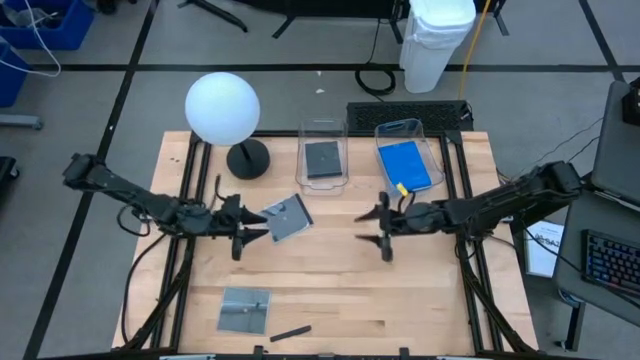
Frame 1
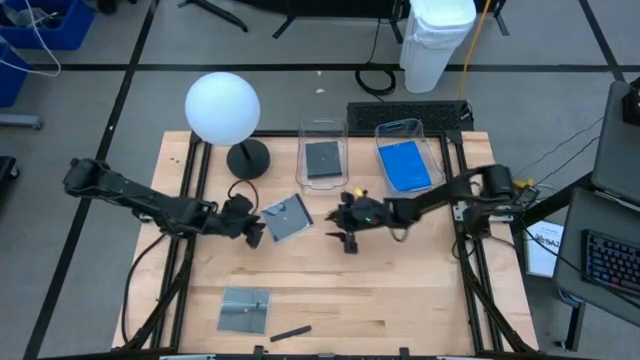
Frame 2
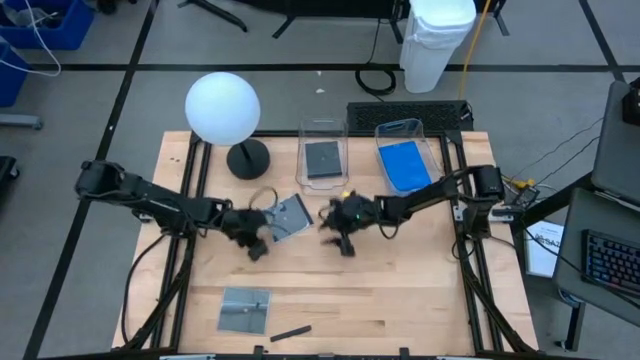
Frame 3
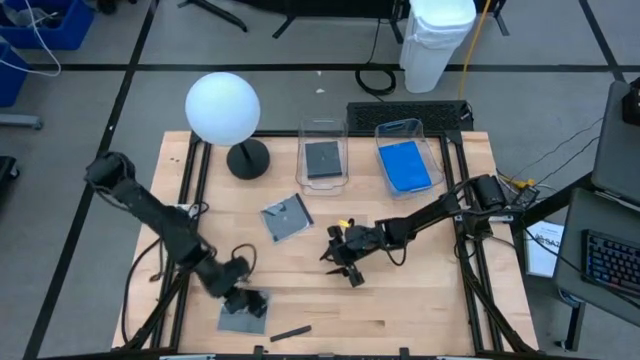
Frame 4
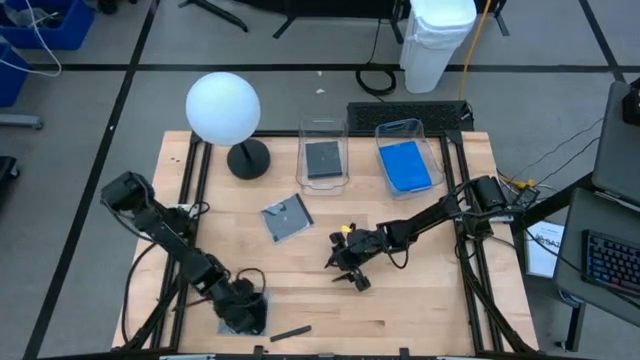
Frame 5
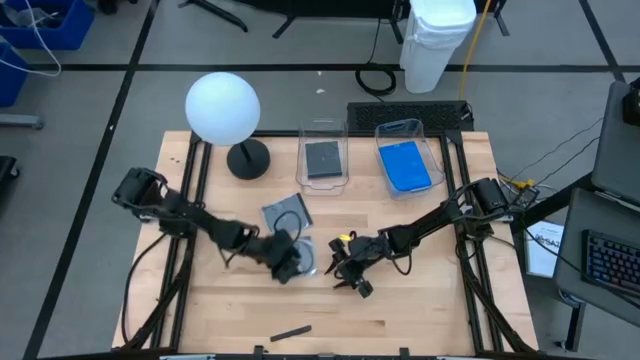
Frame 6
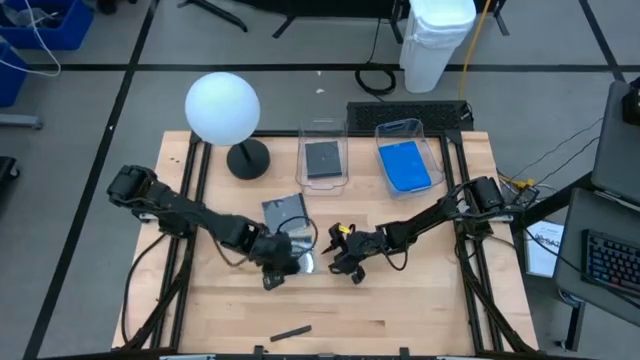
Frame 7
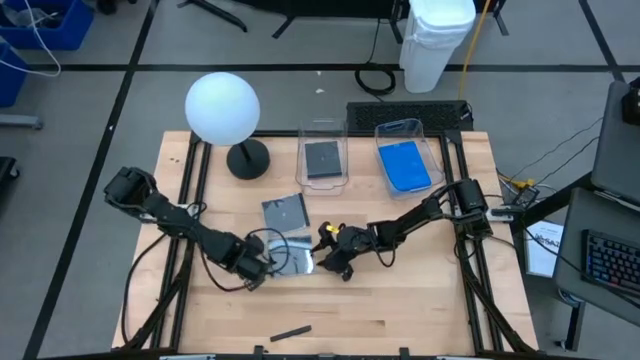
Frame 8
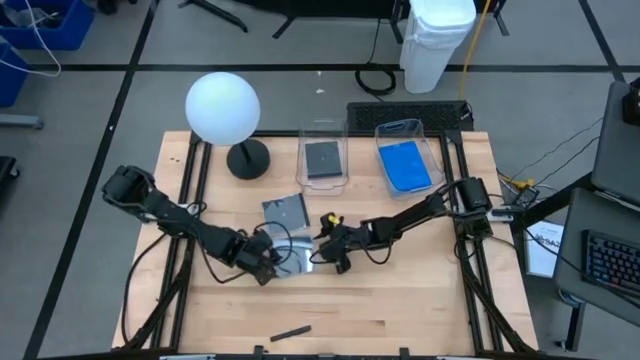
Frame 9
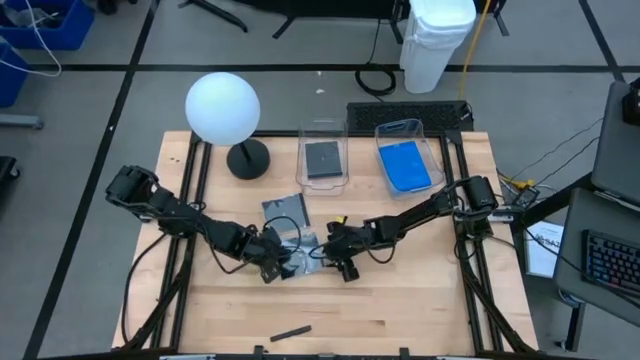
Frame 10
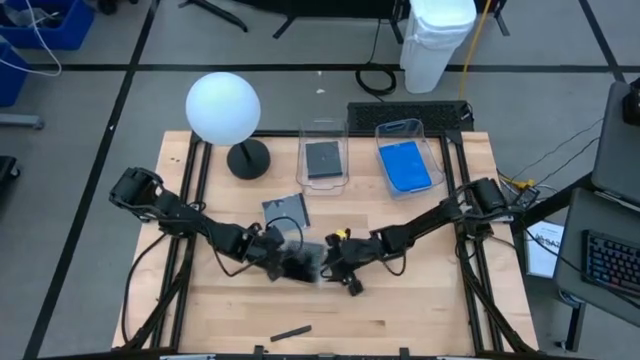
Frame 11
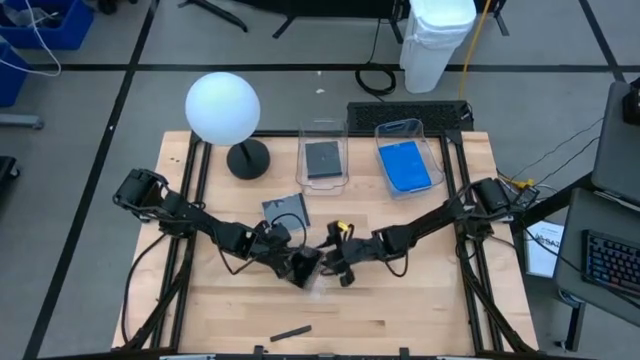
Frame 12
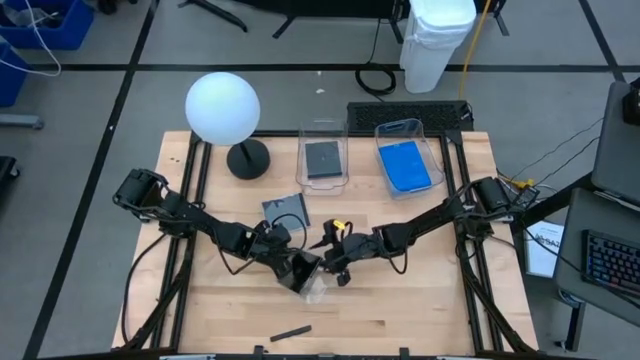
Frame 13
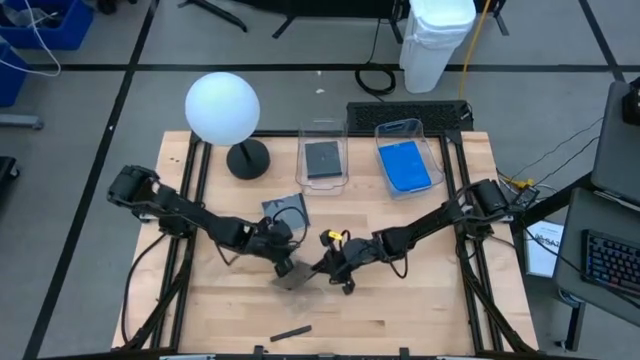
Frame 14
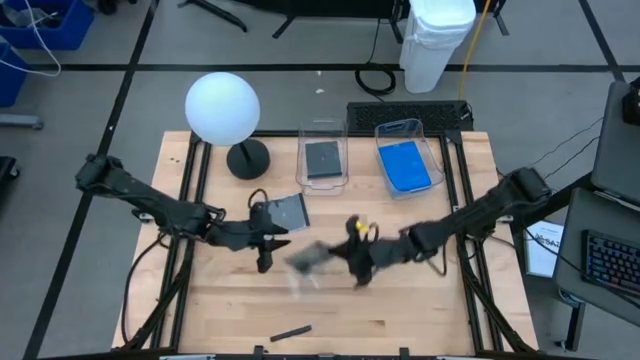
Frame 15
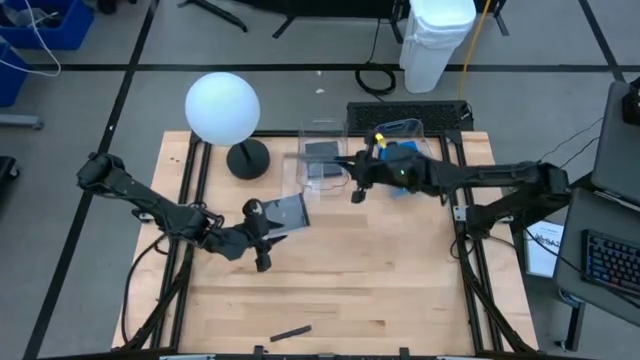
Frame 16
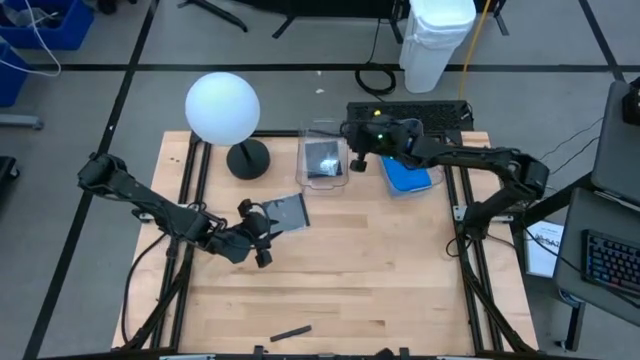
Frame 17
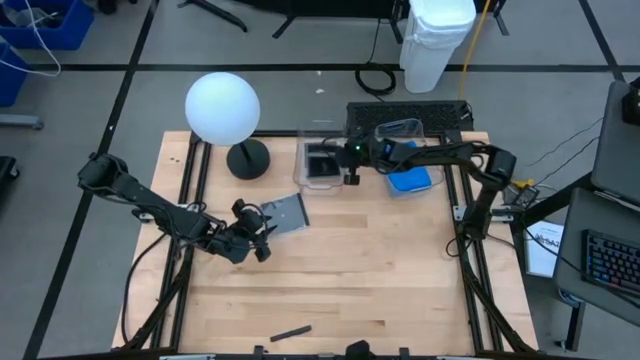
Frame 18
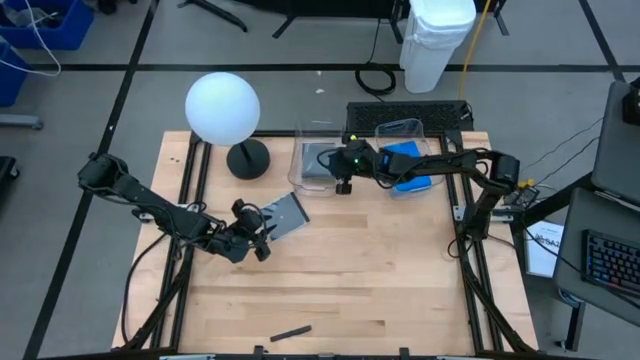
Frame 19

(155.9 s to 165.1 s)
Task: Pick & place jewel cases by type
Put the bottom black CD case into the left transparent bin

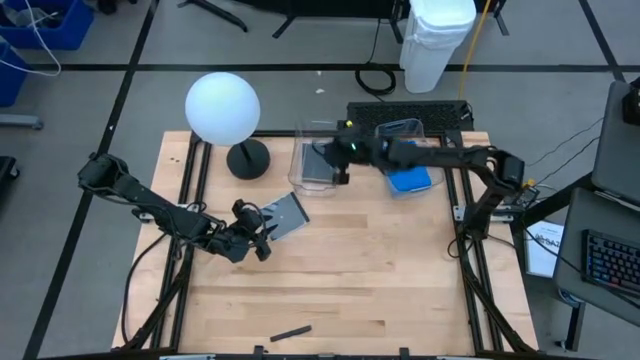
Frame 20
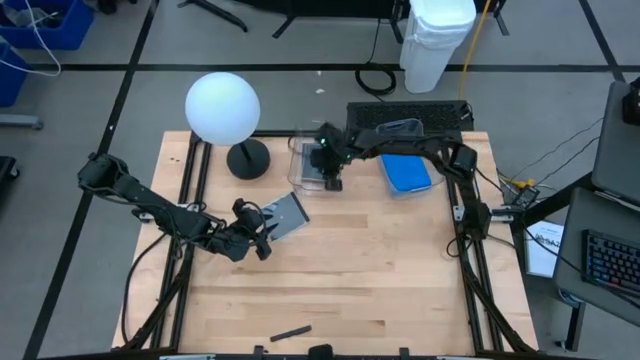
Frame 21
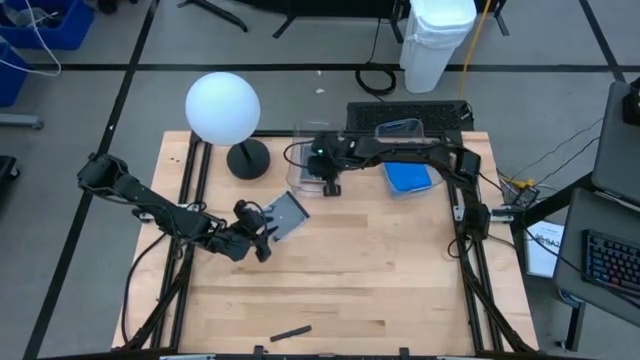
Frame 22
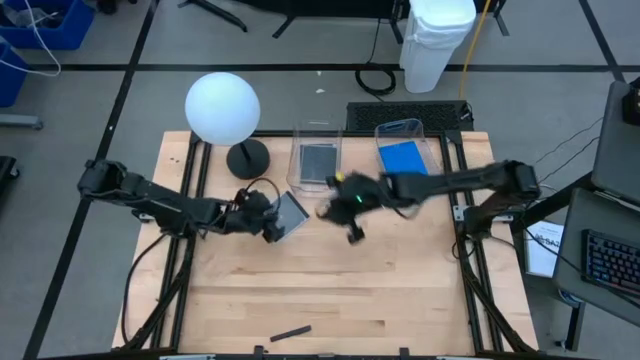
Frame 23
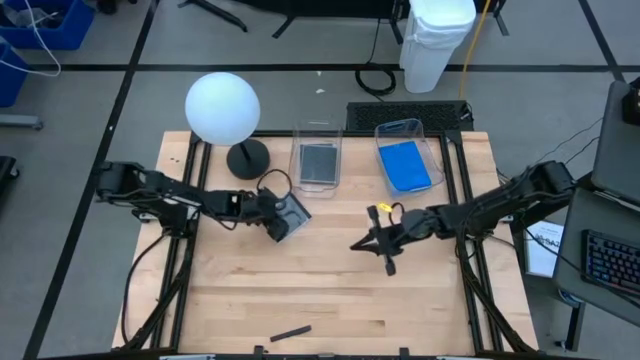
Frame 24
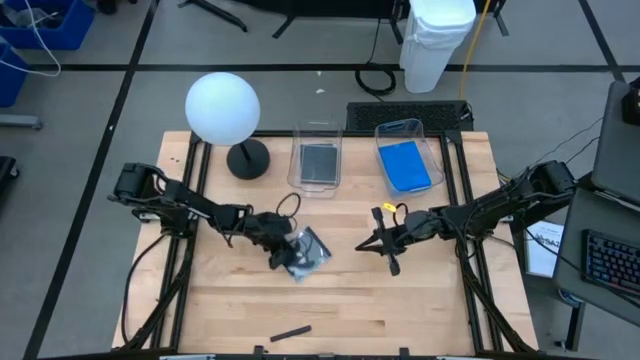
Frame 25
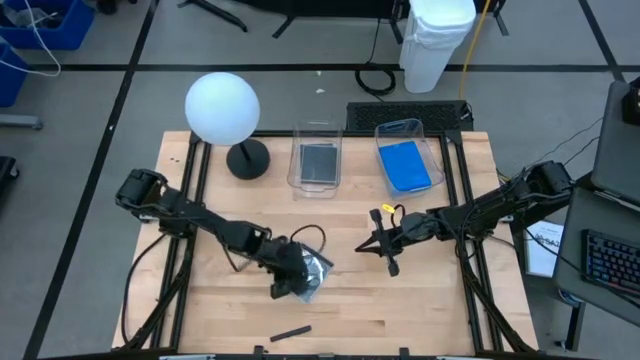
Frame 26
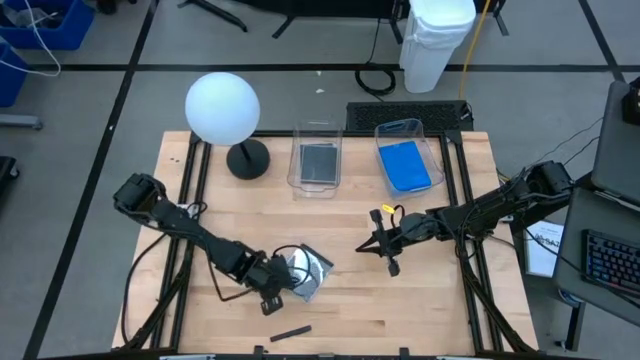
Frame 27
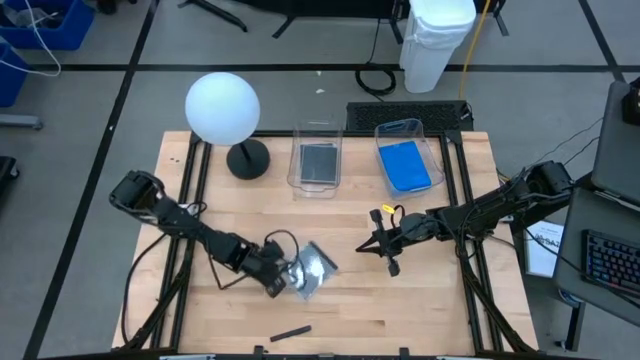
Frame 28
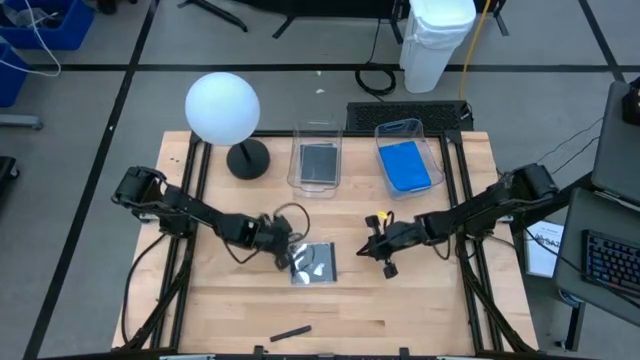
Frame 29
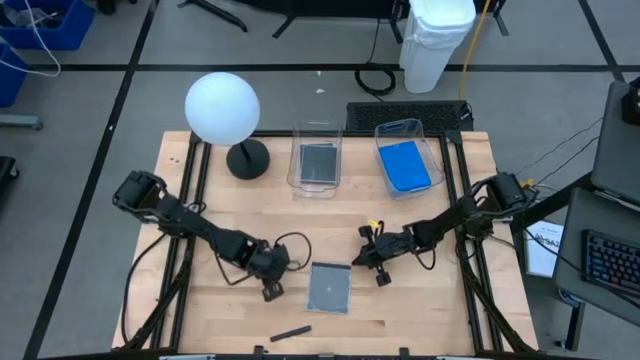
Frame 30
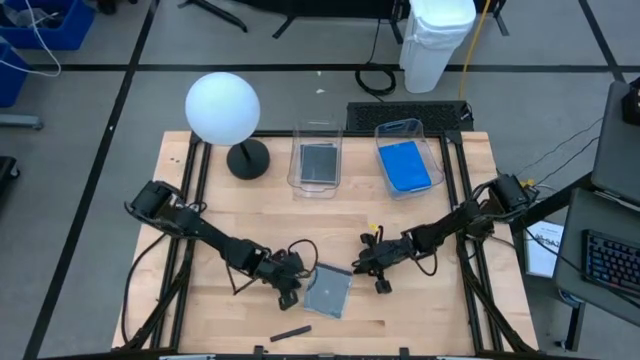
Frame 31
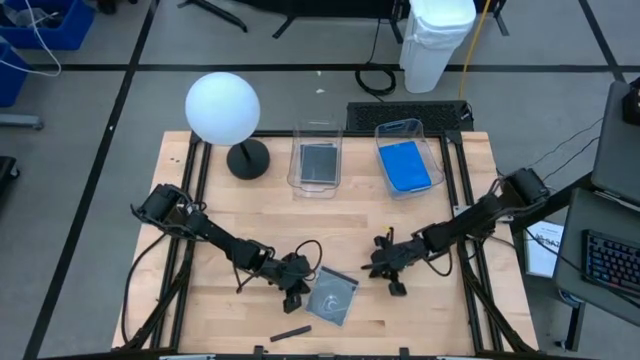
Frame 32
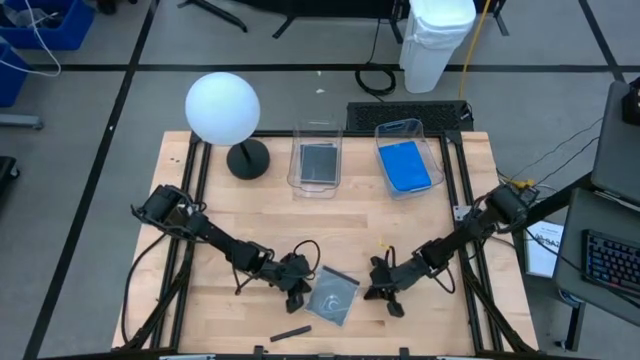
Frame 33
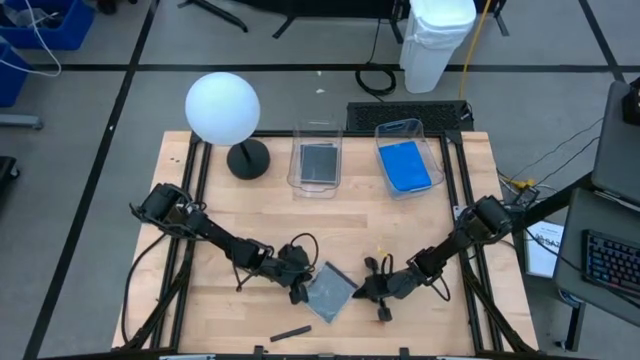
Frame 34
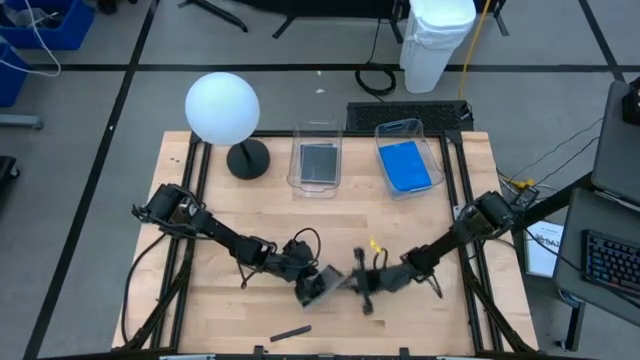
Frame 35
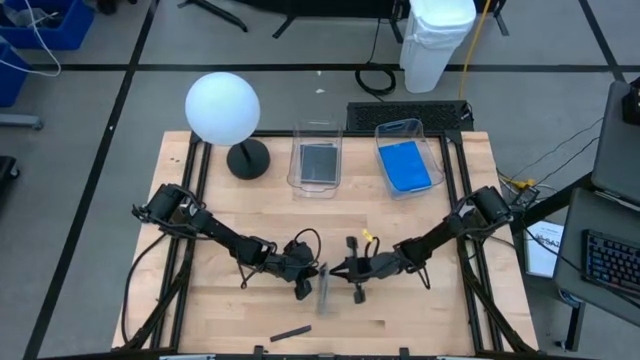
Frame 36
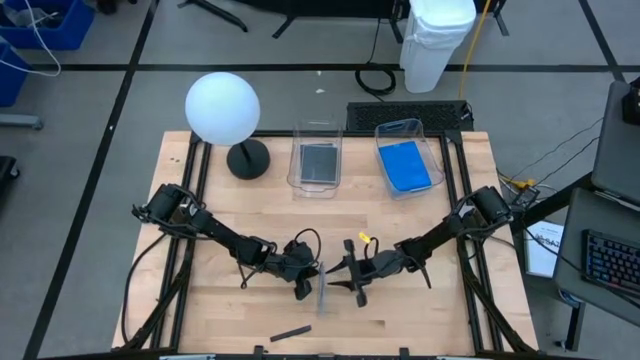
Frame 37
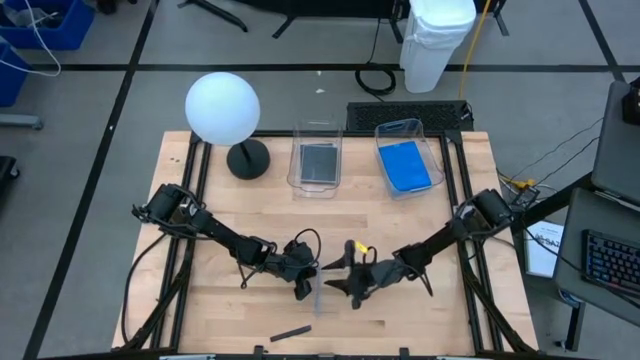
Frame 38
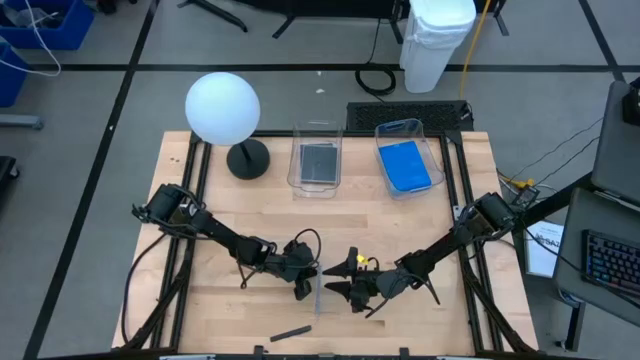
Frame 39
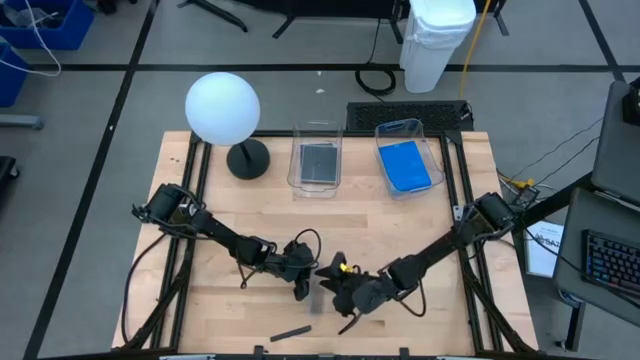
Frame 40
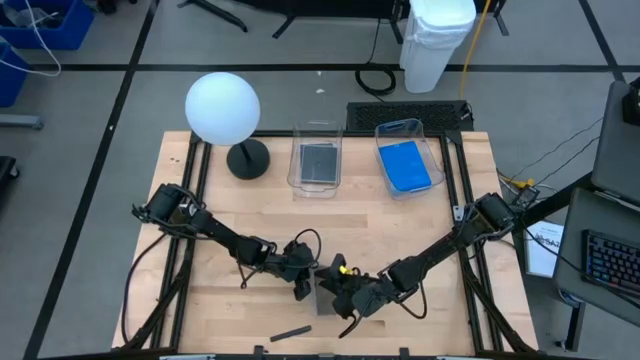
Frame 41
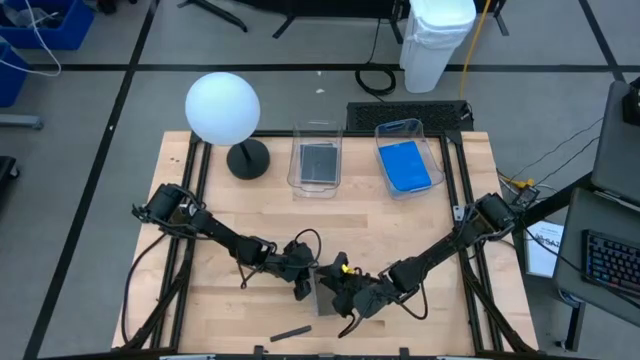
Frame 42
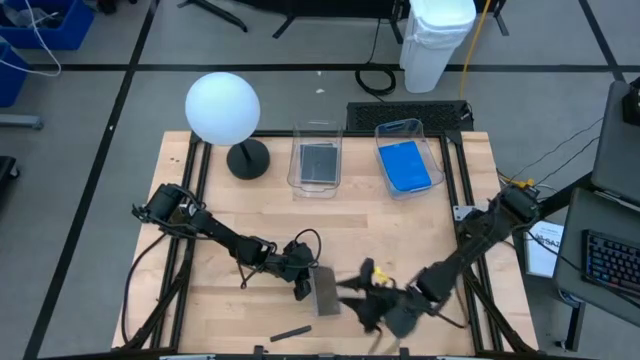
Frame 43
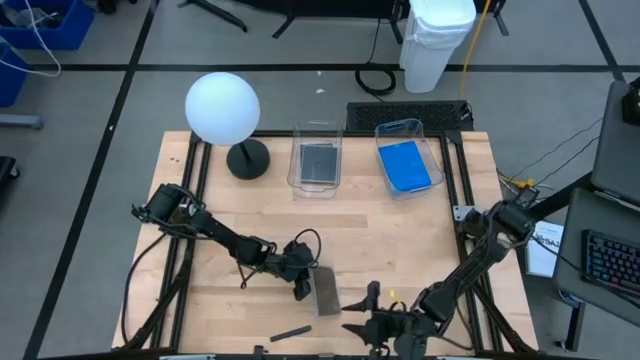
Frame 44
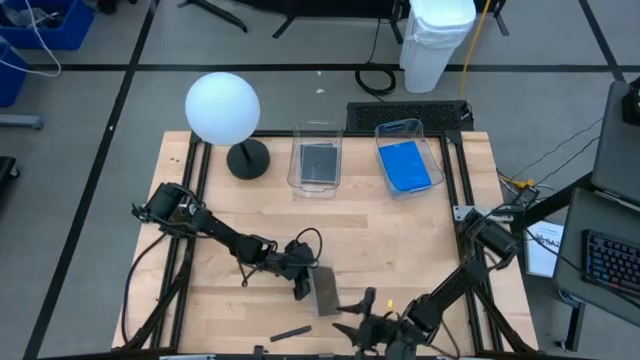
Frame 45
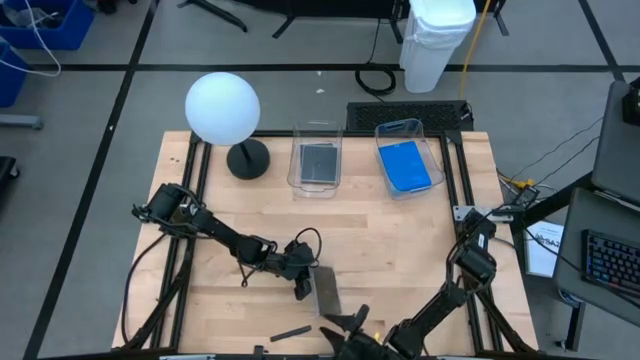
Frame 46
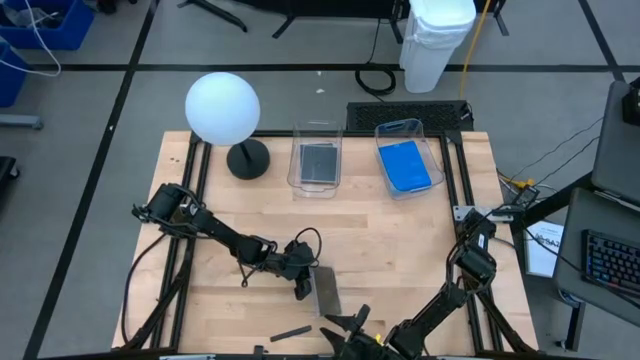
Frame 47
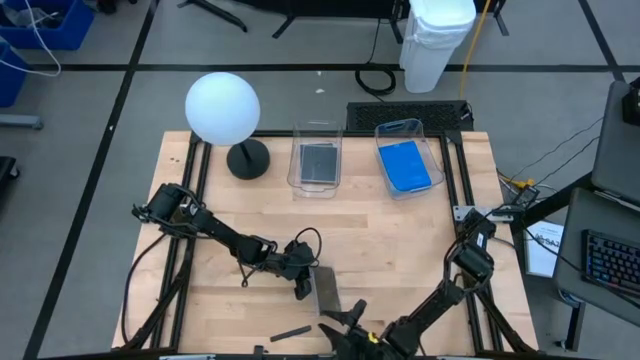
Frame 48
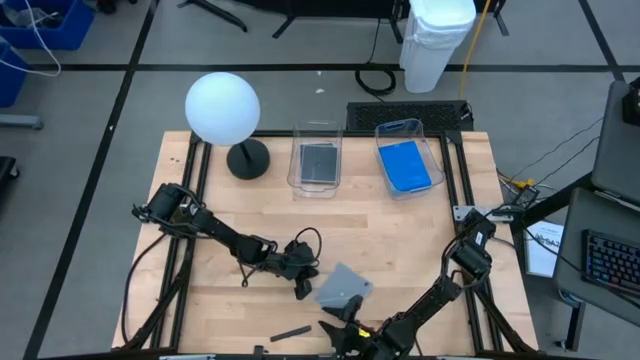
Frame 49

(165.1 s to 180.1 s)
Put the black CD case into the left transparent bin
